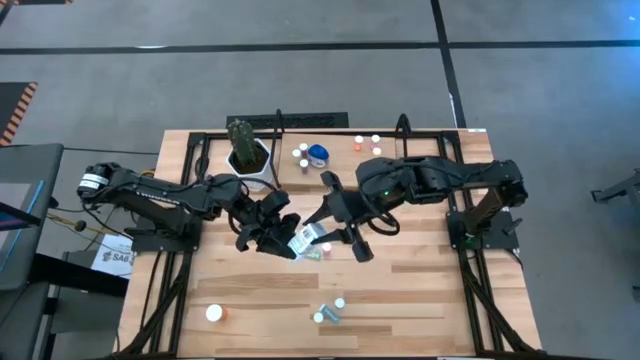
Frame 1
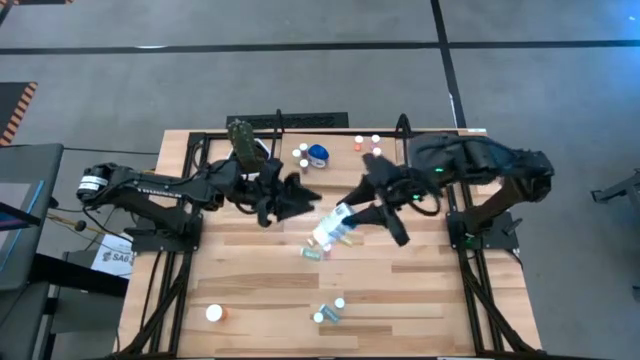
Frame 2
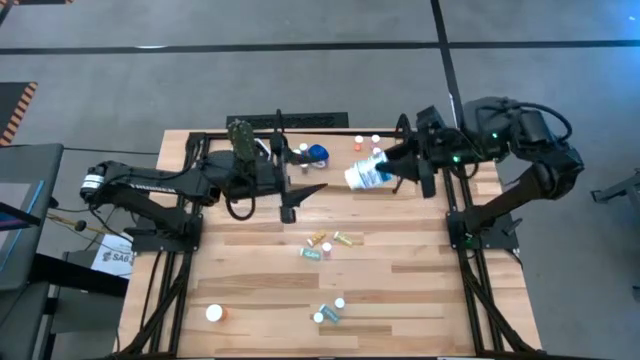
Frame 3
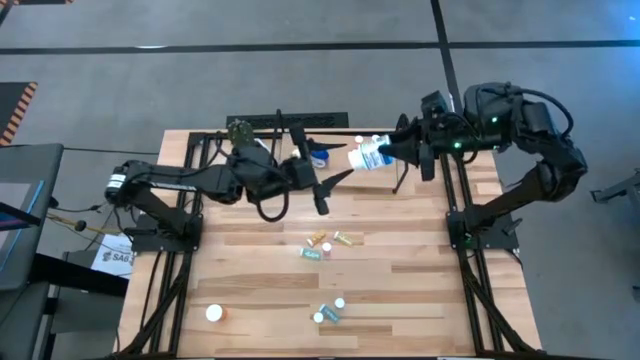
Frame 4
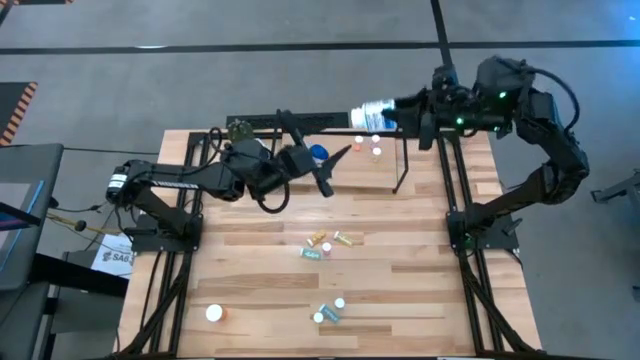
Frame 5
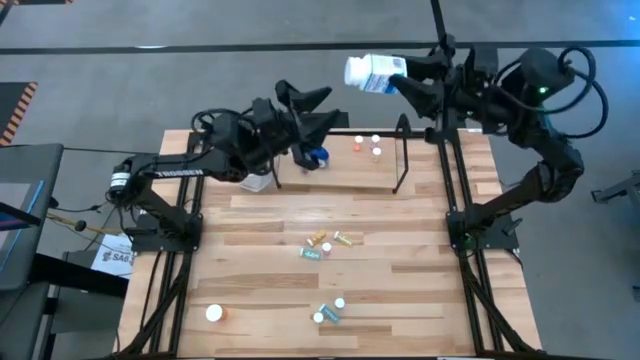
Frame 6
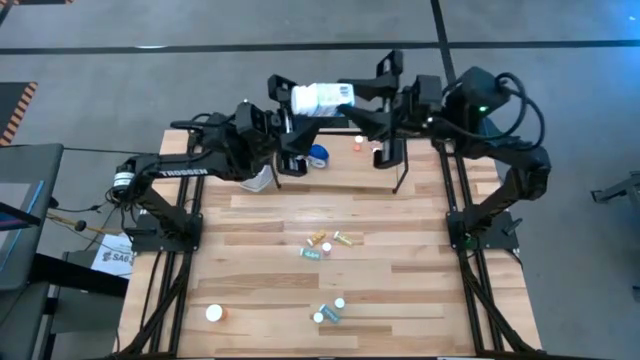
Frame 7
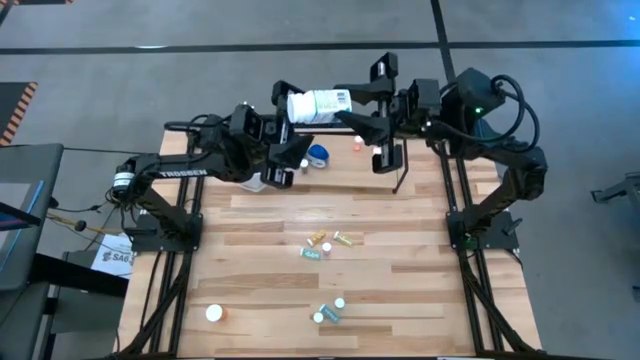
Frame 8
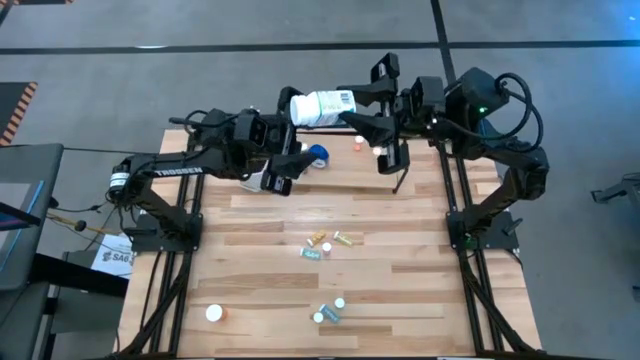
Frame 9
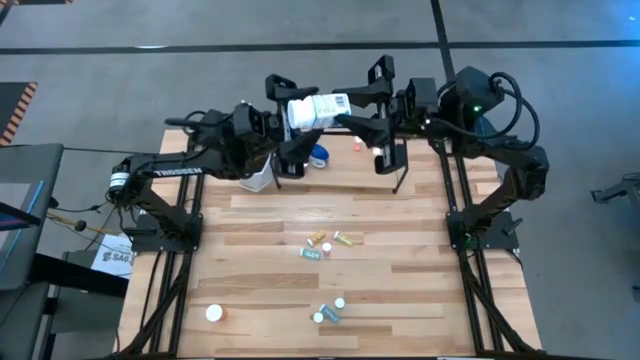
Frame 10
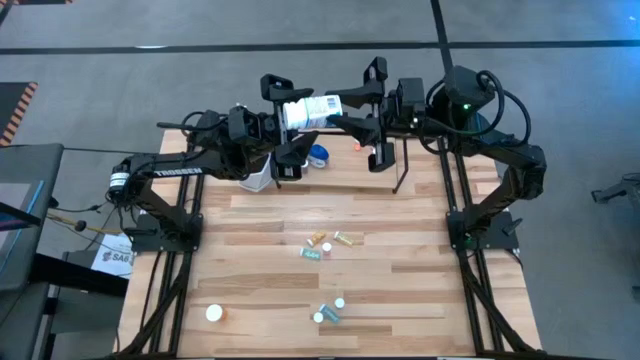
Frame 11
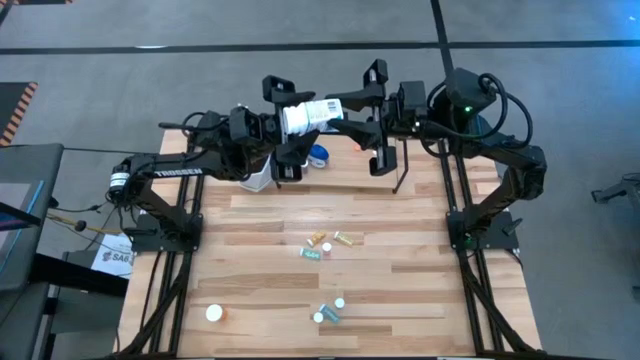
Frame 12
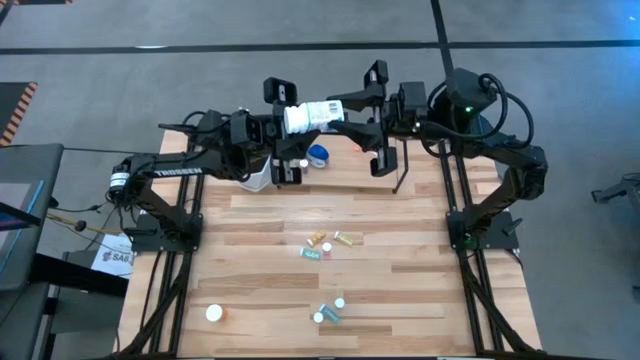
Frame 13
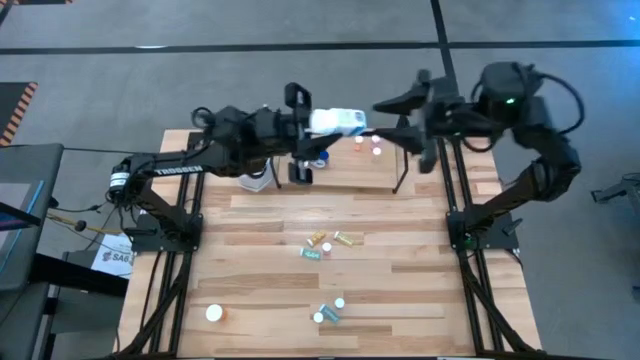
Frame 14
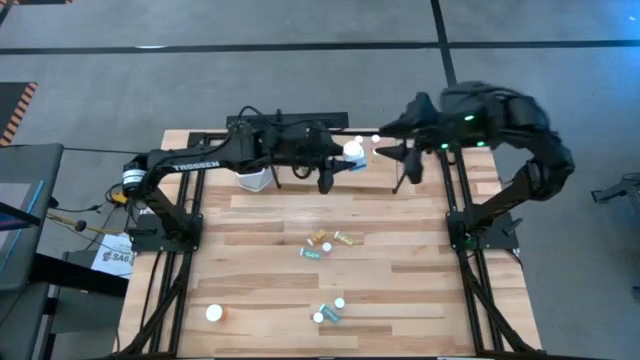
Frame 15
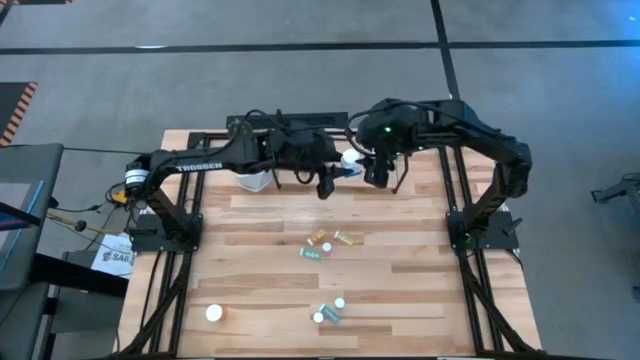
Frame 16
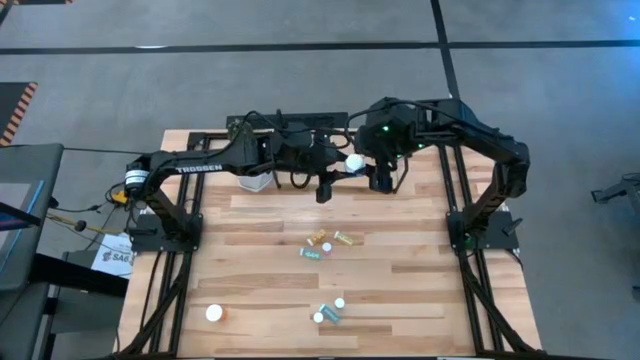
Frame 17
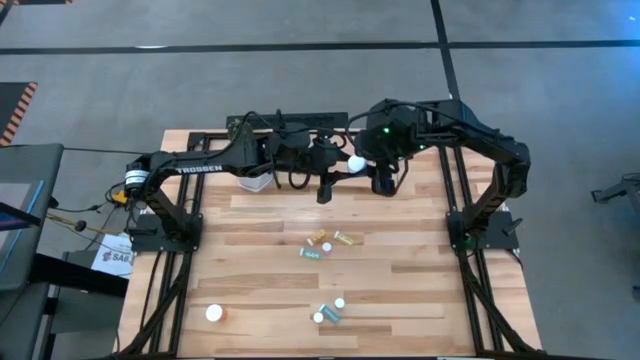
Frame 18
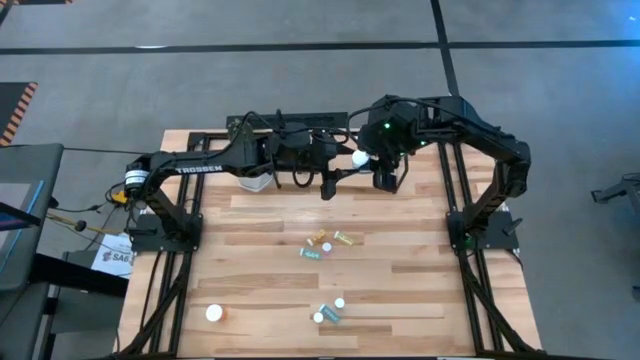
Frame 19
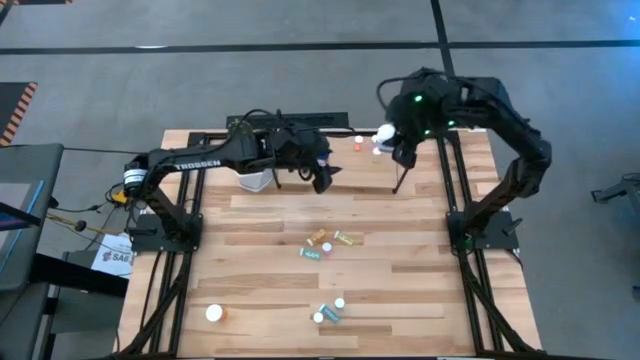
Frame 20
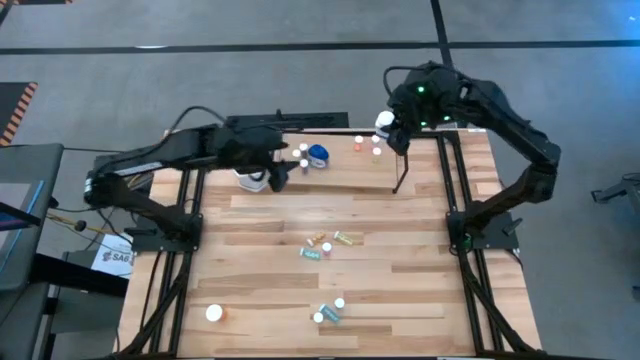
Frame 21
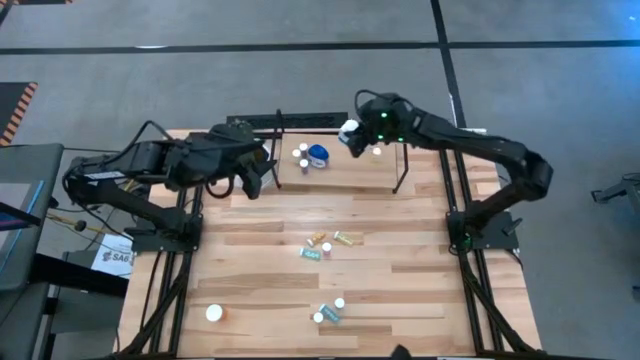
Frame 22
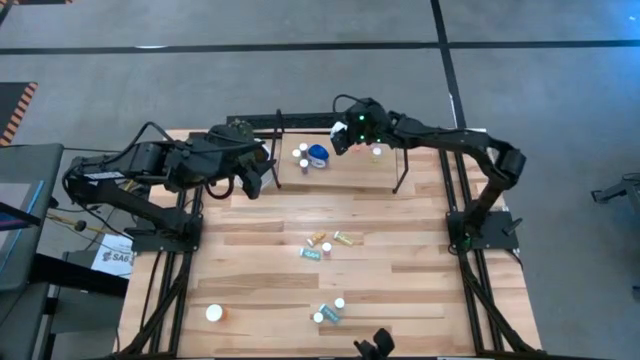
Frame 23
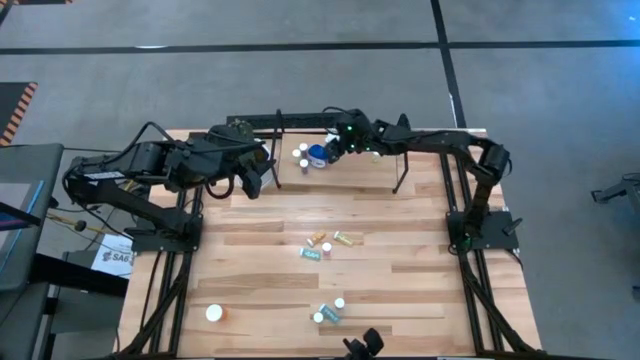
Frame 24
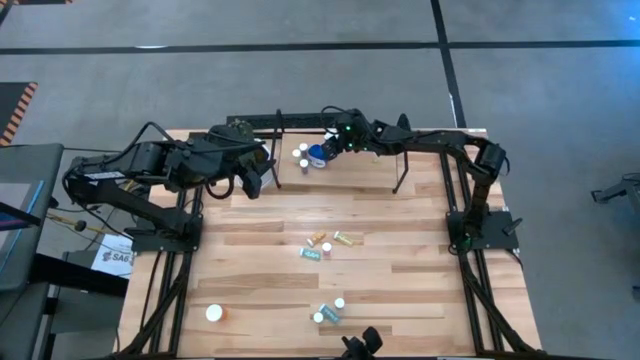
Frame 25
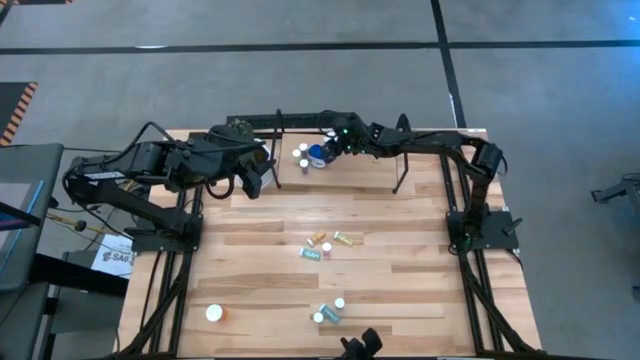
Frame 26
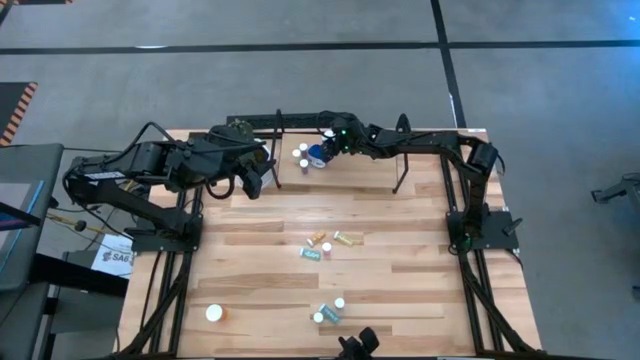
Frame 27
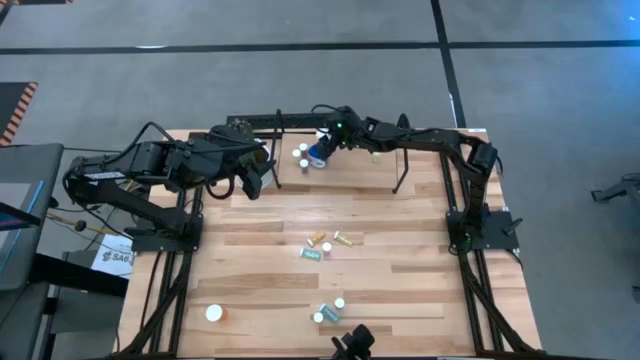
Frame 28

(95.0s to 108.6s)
Task: Pick and place medicine bottles onto shelf by color
Put the white pill bottle on the shelf

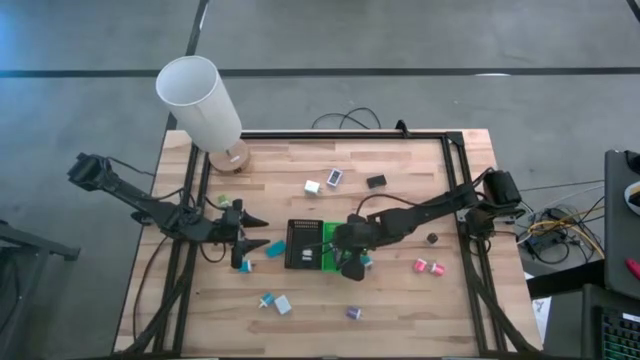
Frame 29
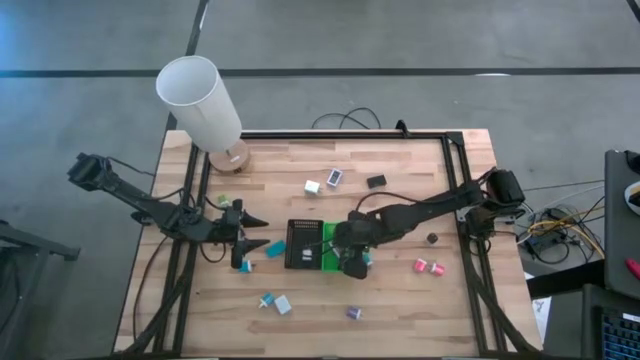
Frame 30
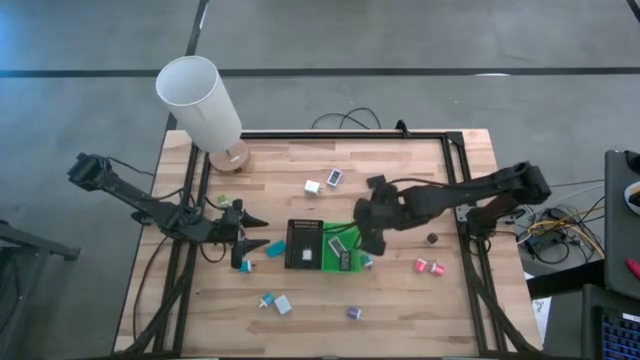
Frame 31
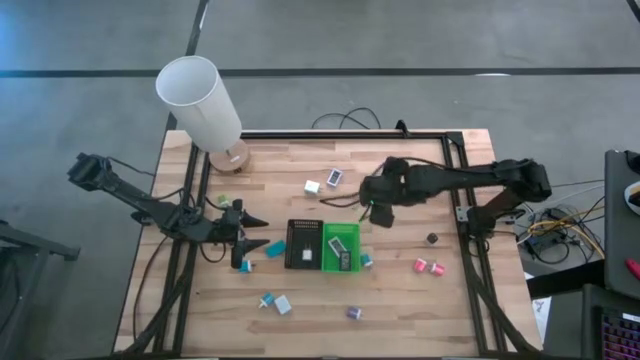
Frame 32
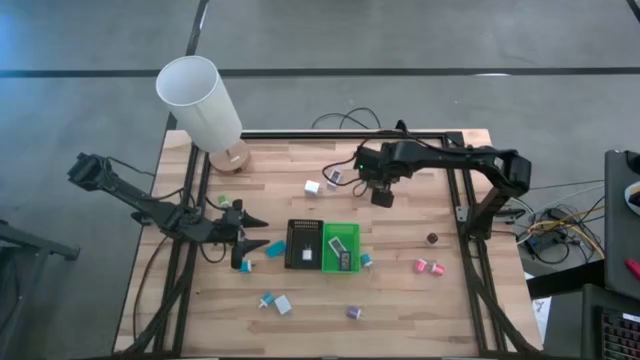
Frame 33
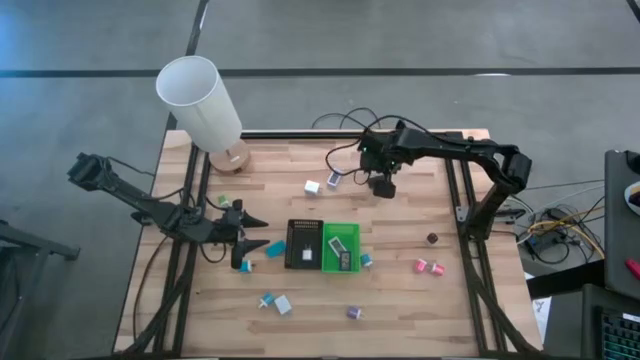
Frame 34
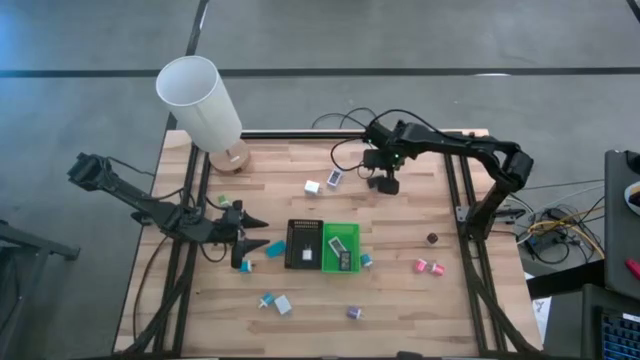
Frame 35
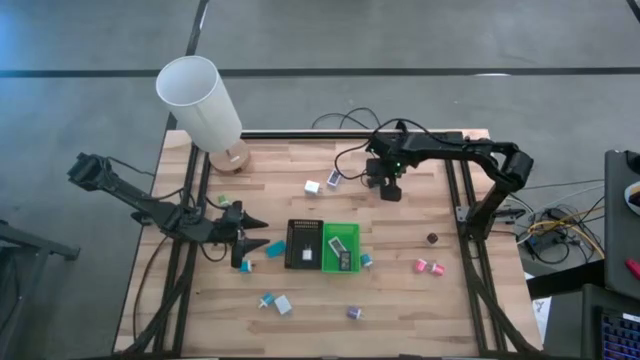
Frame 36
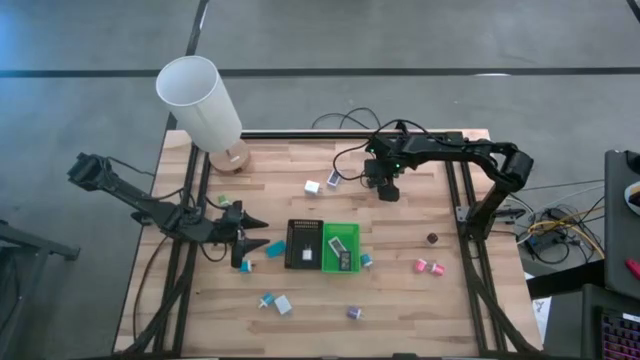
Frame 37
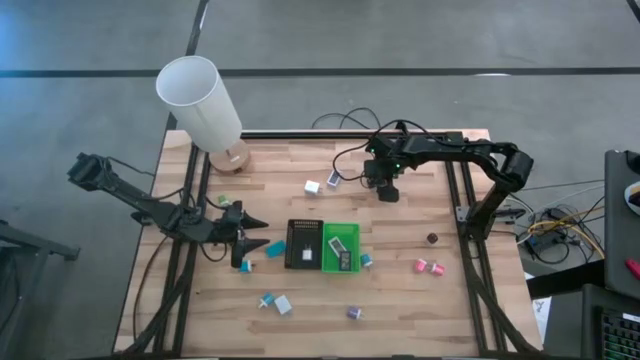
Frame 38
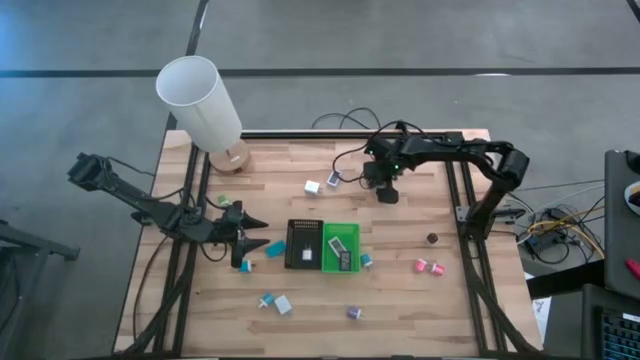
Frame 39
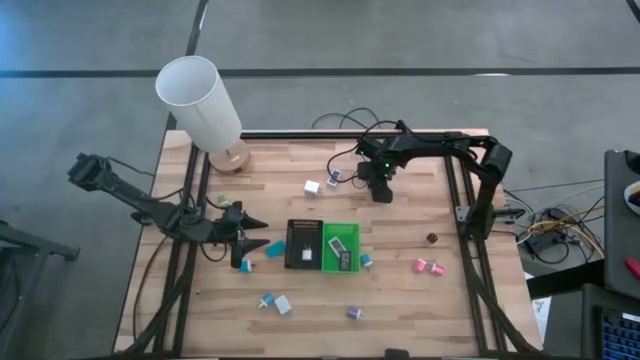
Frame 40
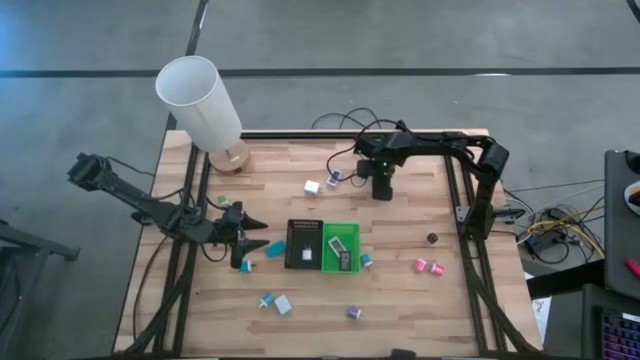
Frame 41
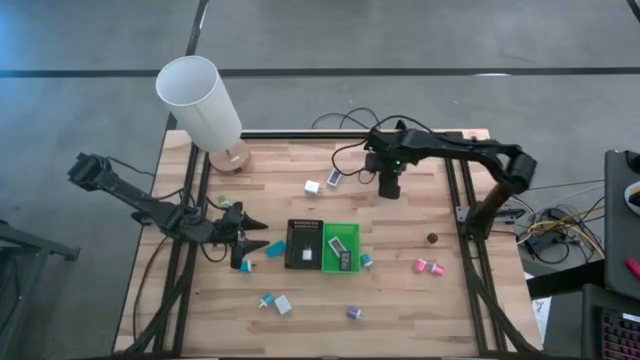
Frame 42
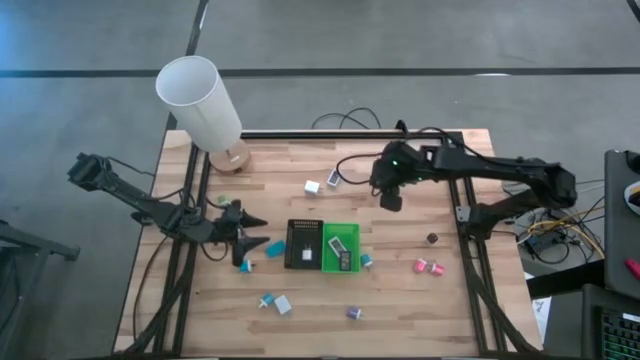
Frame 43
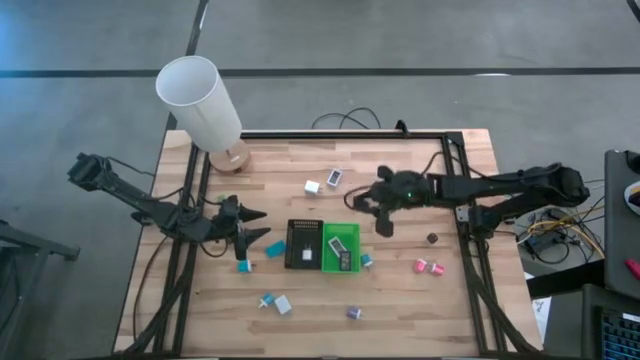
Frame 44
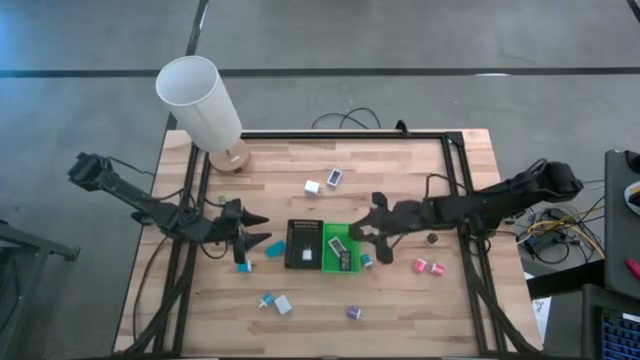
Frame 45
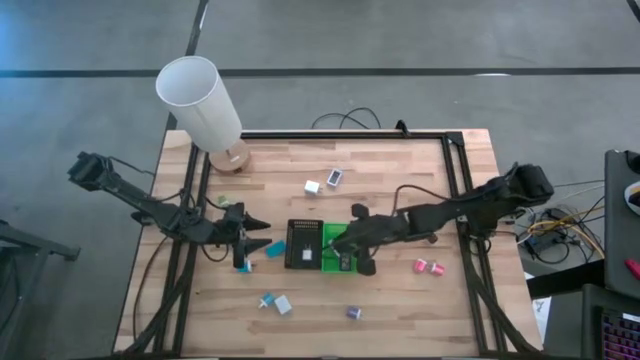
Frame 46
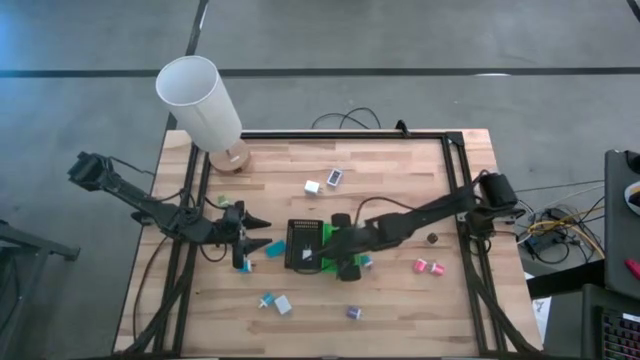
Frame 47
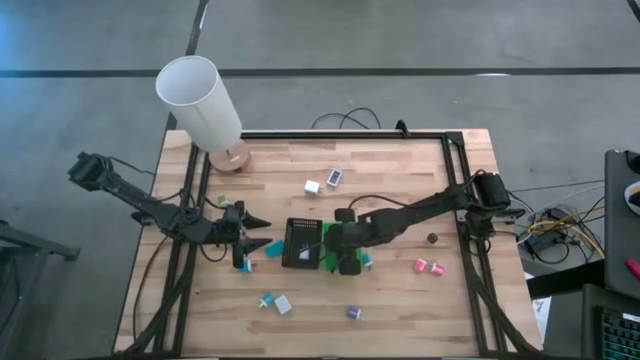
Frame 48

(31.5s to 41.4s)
Task: Pick & Place Office items
Put the black timer into the green bin
